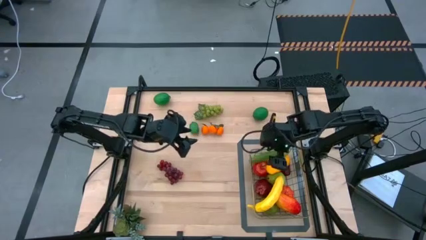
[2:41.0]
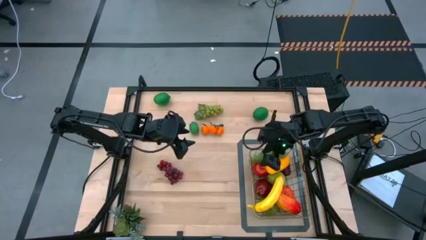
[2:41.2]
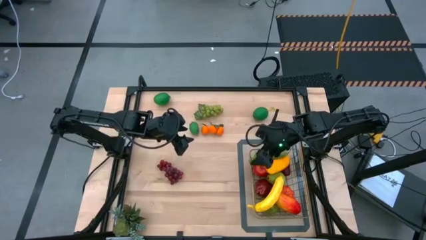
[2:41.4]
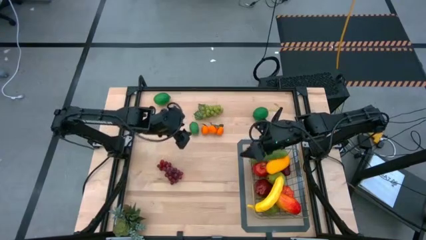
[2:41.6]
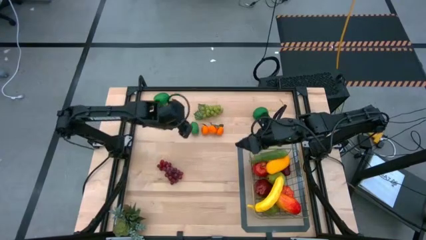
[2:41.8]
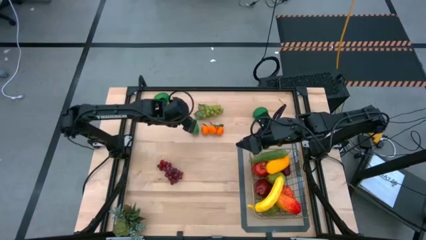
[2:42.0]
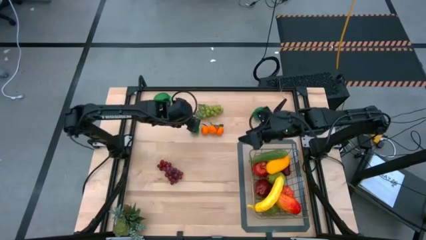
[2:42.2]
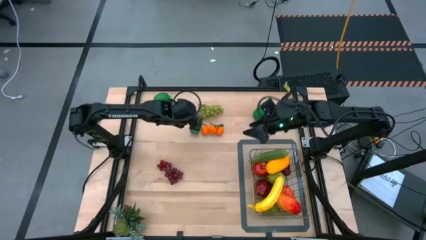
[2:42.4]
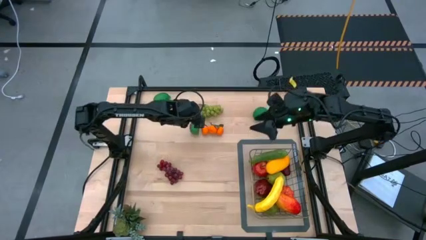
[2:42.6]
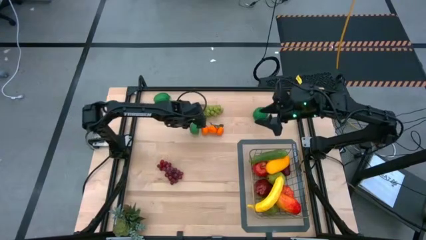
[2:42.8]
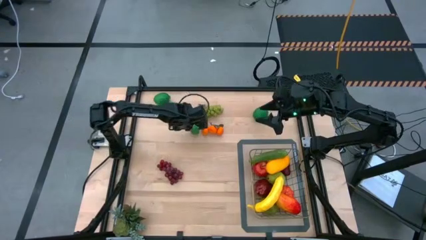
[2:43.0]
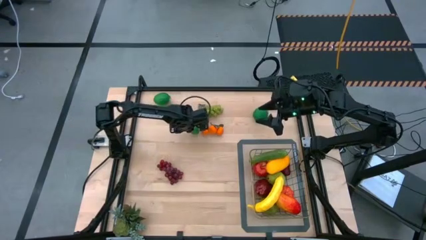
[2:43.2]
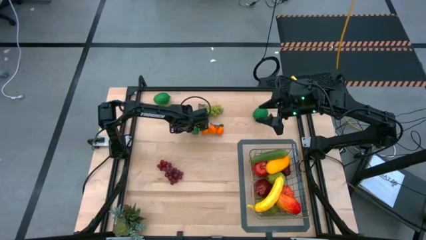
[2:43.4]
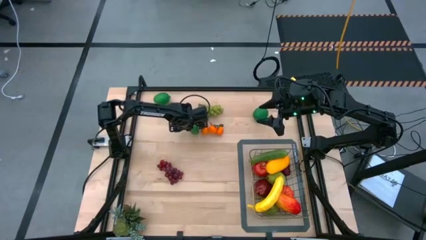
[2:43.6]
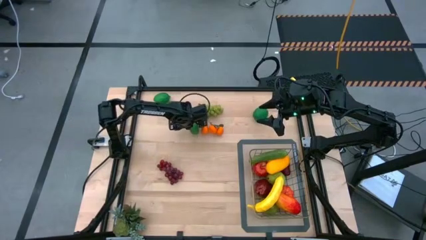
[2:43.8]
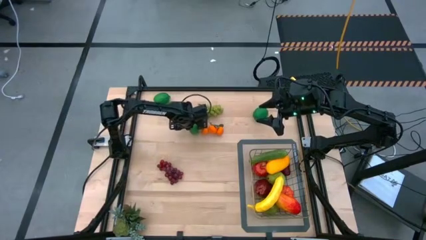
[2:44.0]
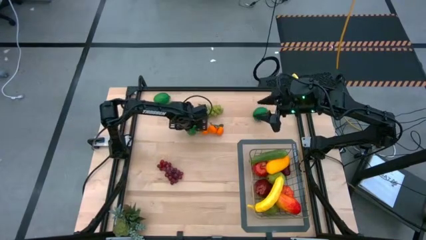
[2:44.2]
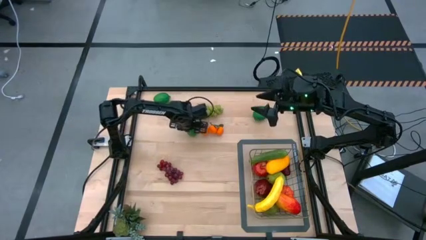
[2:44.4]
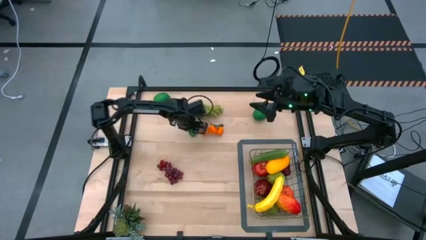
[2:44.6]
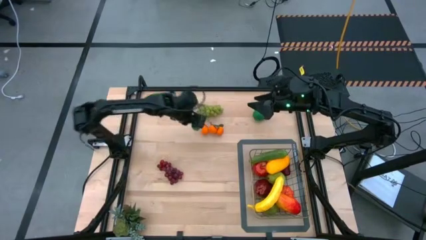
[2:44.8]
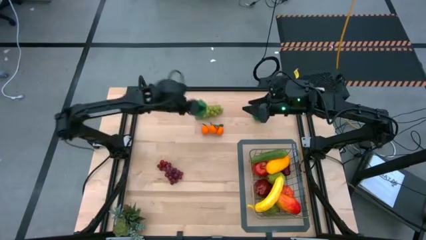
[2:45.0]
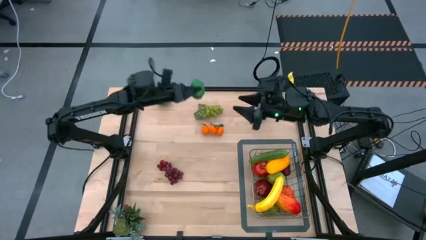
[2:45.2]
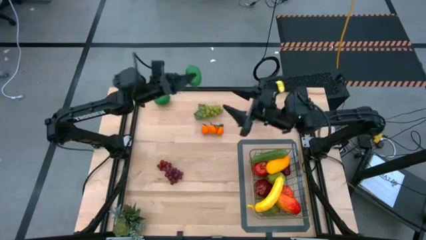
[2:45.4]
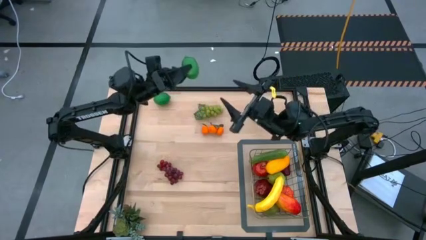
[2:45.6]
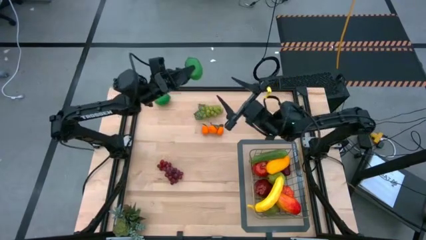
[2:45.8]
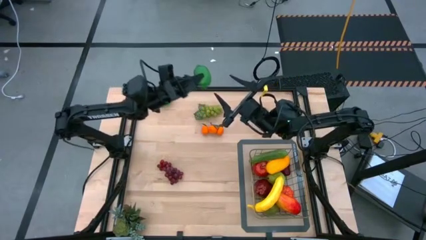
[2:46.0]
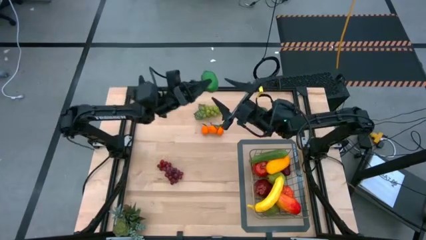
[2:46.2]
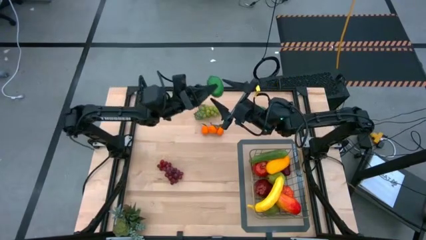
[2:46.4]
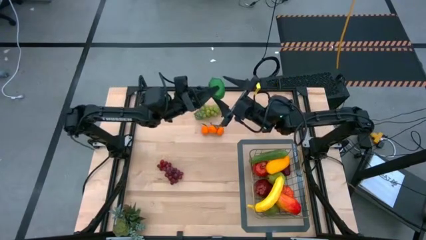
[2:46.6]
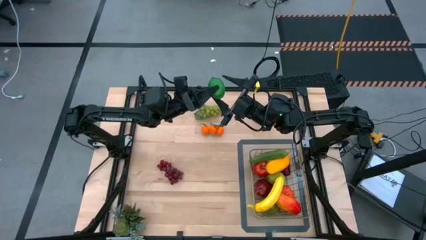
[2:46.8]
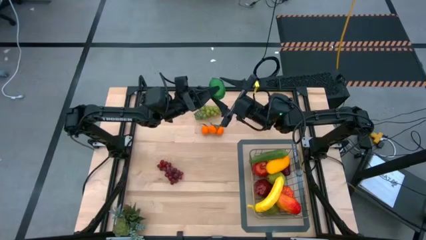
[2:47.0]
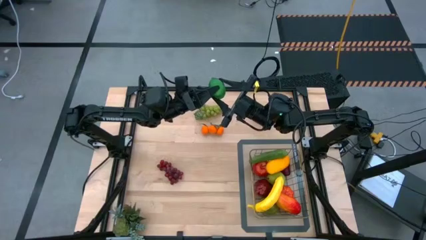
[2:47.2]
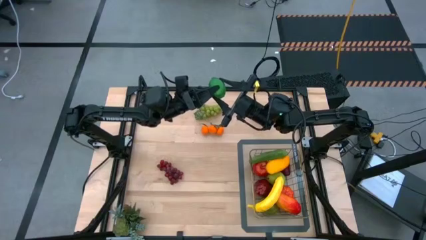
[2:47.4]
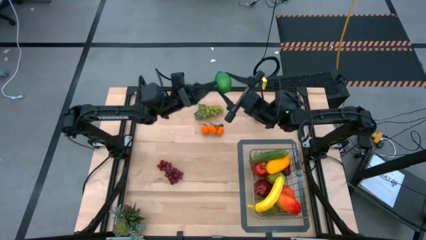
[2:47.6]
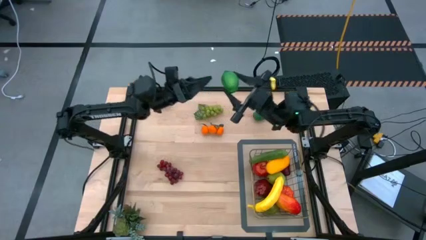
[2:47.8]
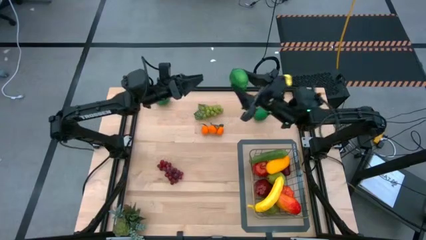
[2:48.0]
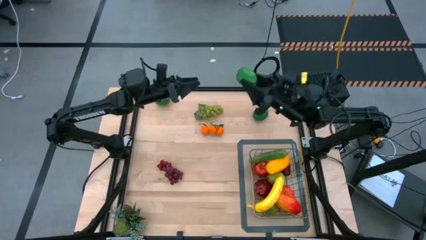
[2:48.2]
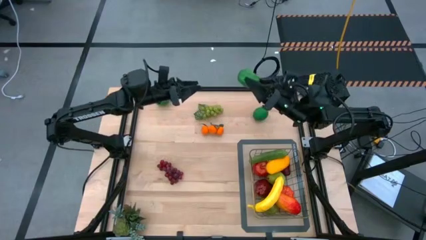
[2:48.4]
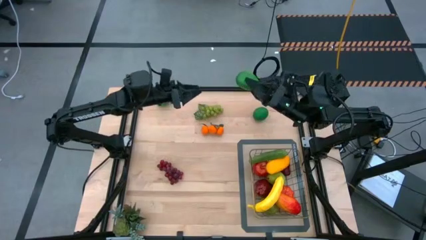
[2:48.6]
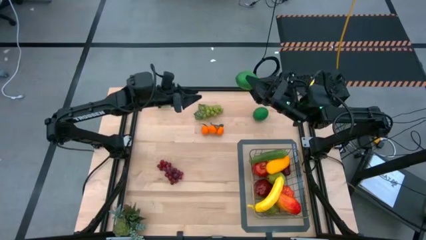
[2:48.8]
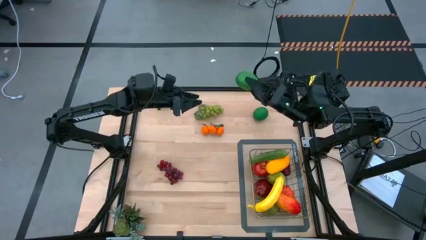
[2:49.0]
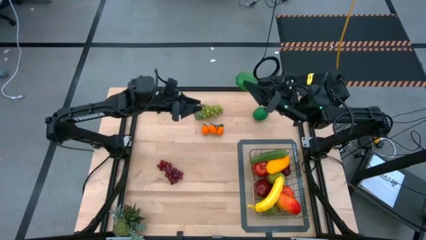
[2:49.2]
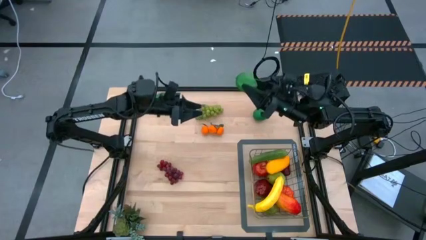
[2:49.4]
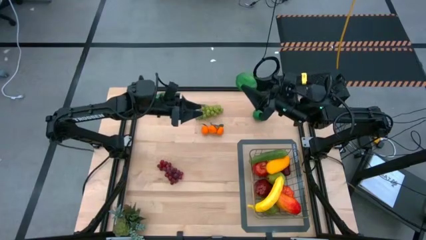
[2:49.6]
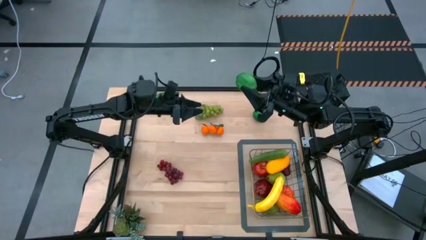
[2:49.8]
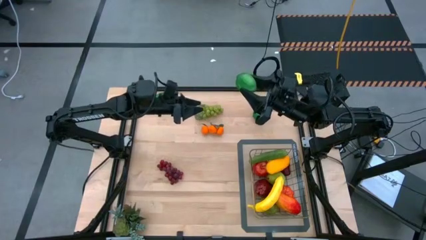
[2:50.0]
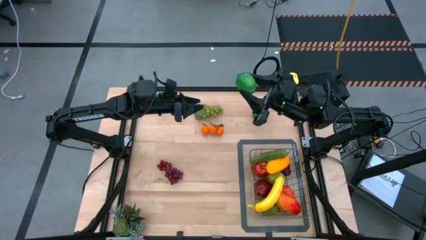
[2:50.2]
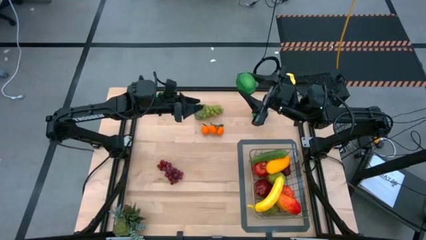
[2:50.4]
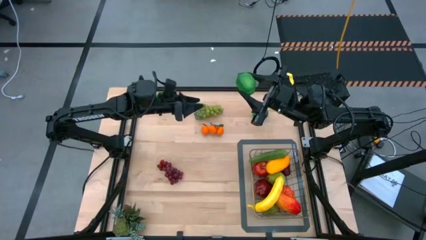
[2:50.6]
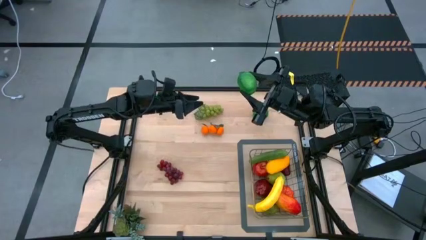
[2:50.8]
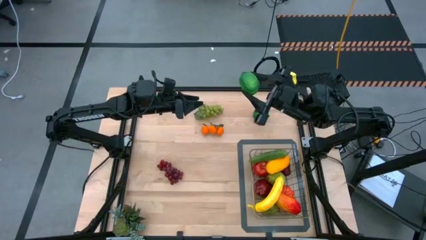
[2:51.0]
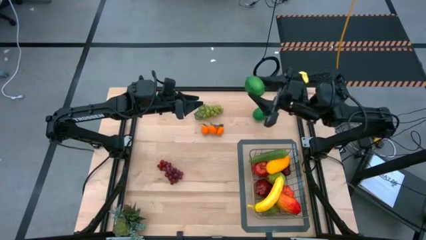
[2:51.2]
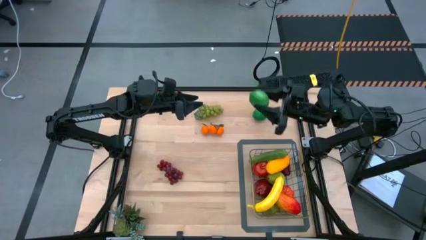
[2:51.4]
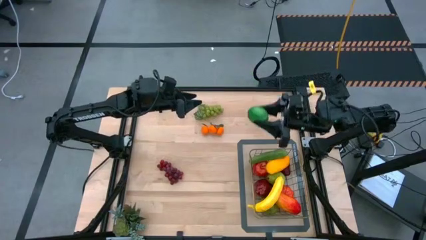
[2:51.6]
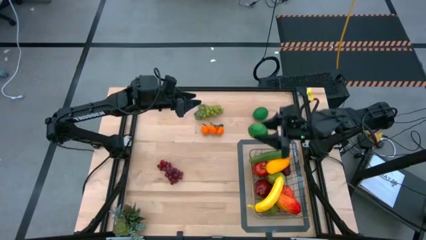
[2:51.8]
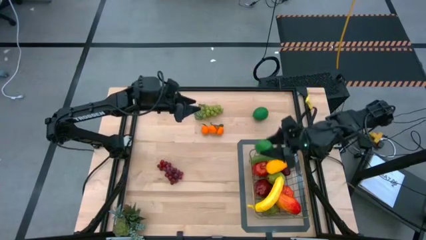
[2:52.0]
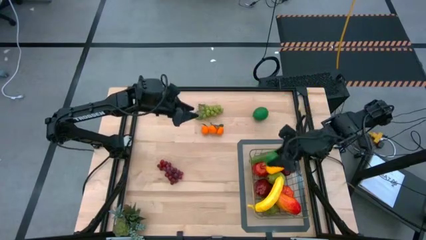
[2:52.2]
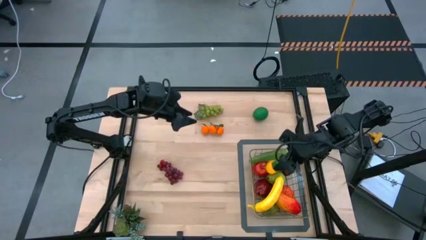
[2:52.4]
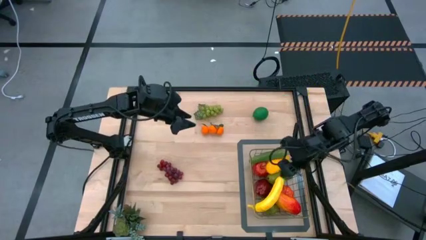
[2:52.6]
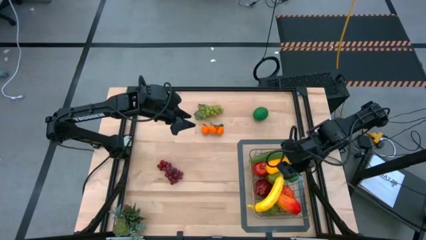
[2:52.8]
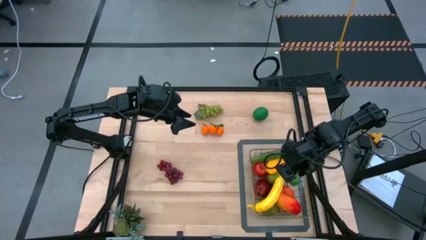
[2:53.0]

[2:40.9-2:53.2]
Task: Build produce basket
Put the middle green lime into the wire basket

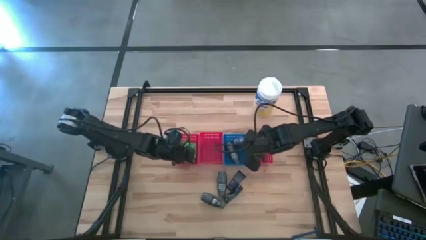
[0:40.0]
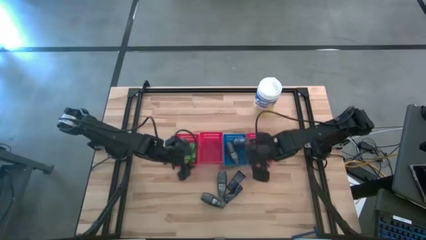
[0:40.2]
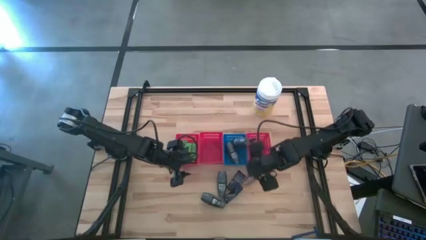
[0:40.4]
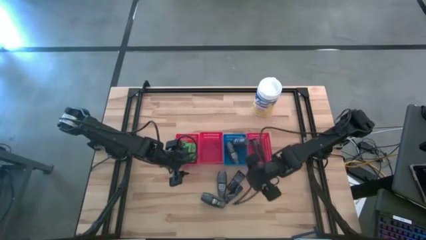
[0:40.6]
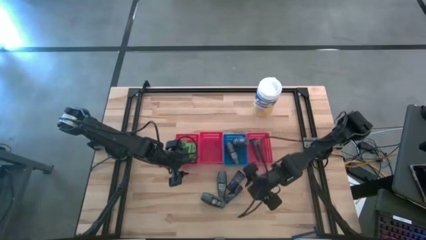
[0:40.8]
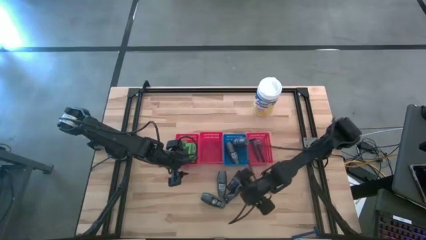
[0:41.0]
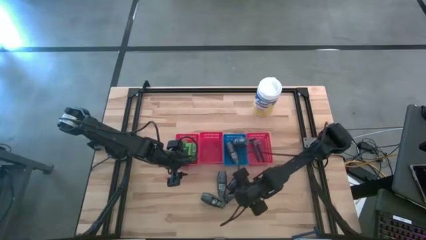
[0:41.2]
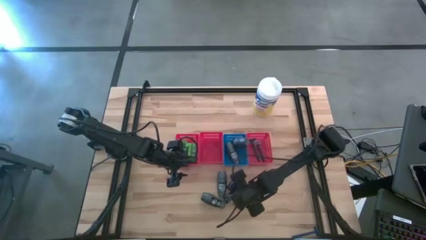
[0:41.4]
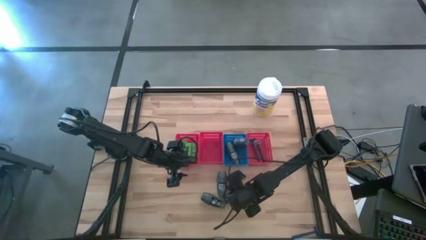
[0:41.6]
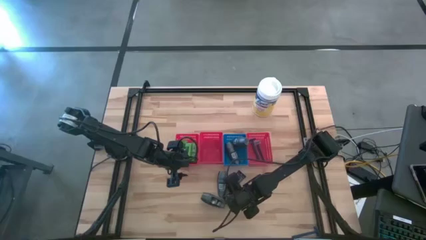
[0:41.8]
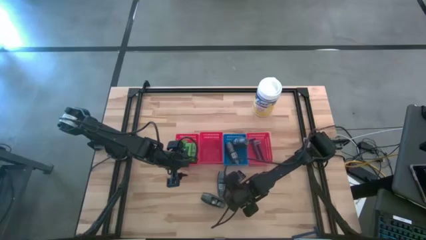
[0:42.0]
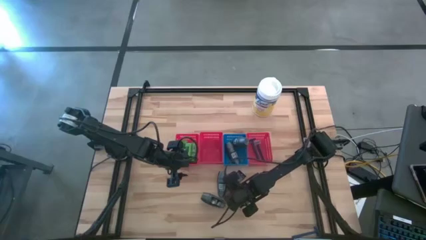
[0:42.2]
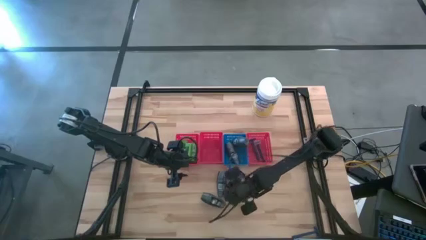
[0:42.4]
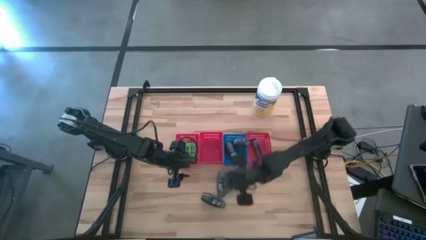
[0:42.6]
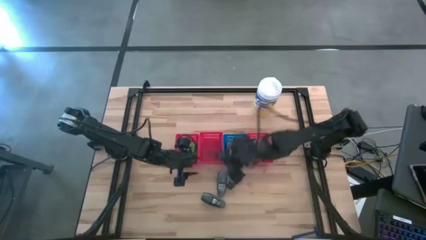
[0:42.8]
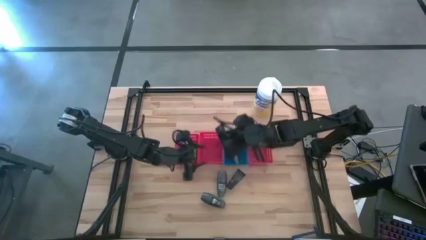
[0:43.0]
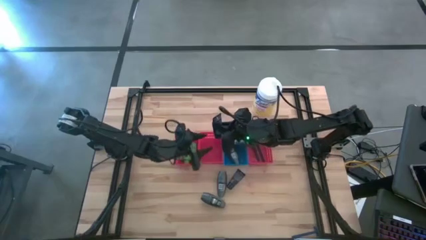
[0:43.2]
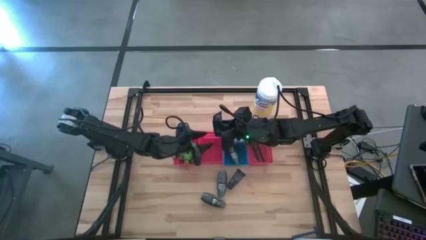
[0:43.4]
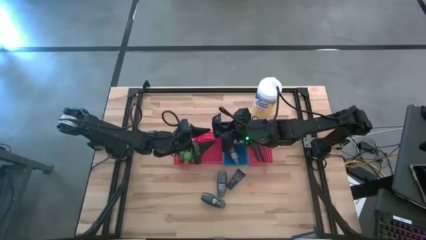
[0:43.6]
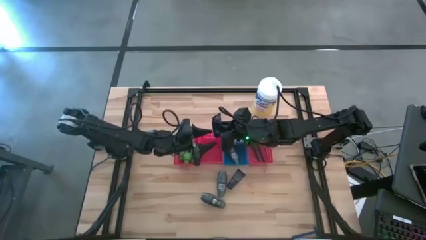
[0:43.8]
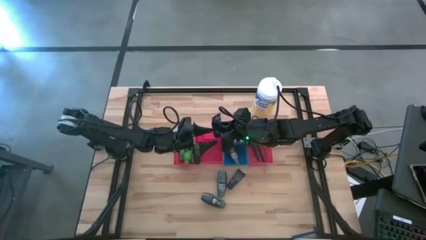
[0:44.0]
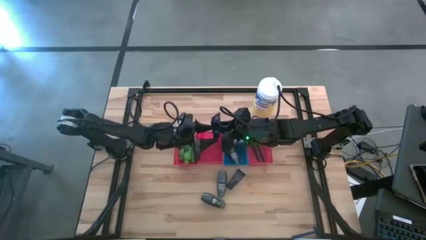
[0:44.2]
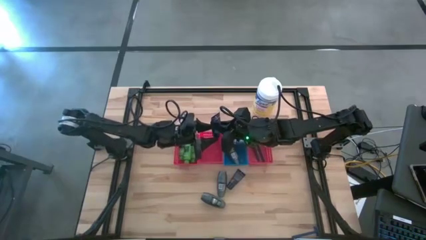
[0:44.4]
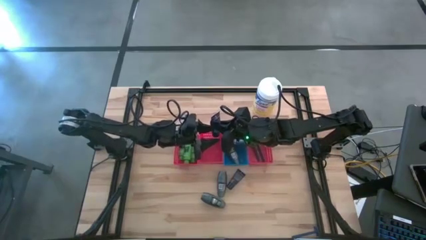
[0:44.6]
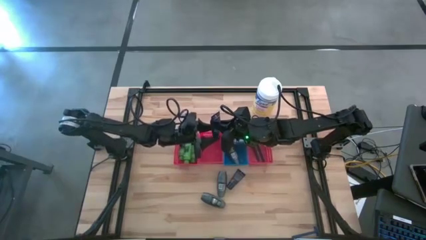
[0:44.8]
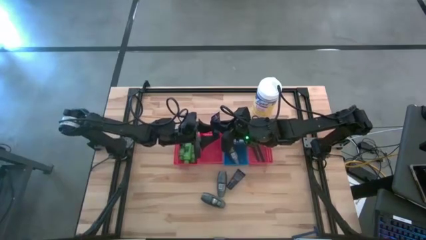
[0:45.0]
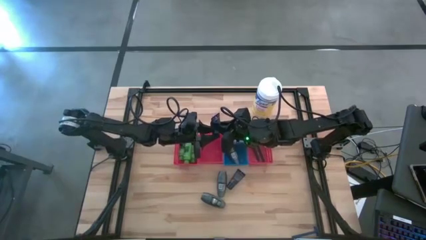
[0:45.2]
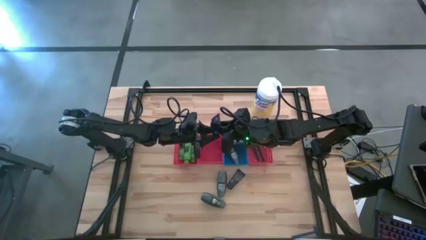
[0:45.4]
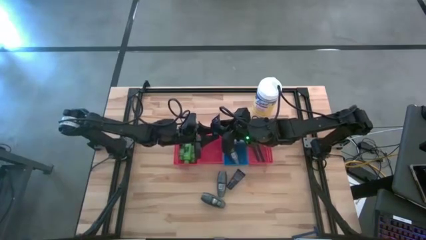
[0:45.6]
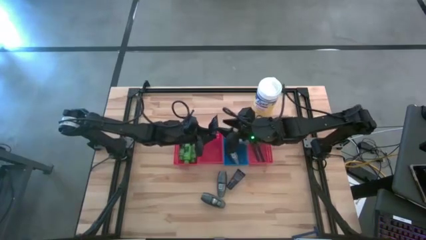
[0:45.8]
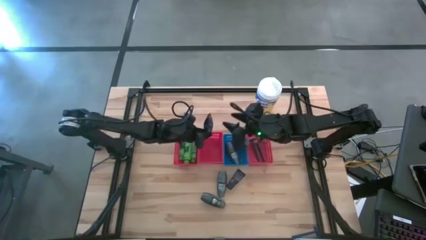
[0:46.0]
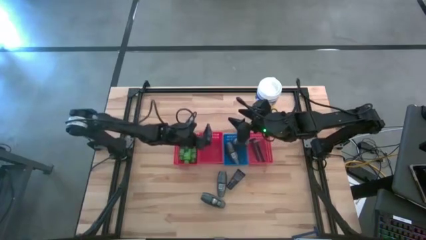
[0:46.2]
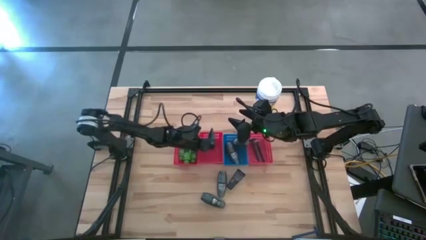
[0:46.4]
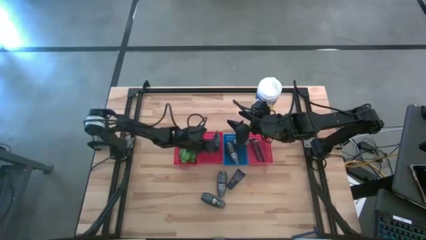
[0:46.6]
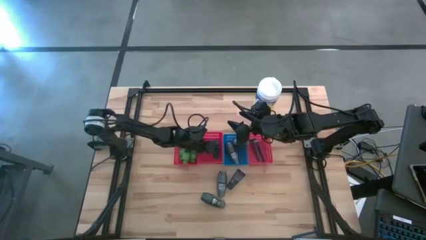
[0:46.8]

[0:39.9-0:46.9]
Task: Pick & Place Travel size toiletries
Put the shave cream into the middle red bin
